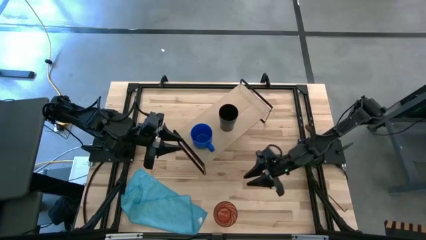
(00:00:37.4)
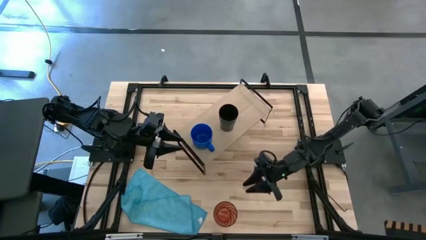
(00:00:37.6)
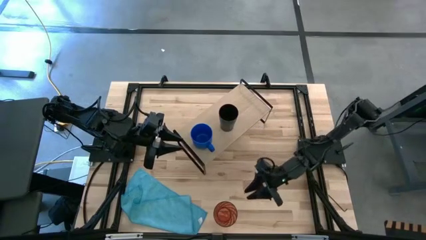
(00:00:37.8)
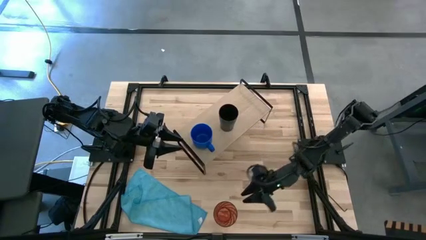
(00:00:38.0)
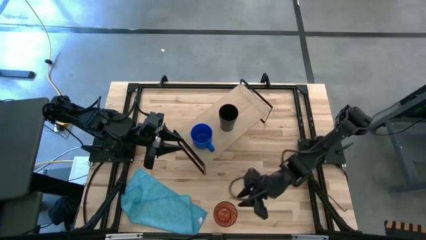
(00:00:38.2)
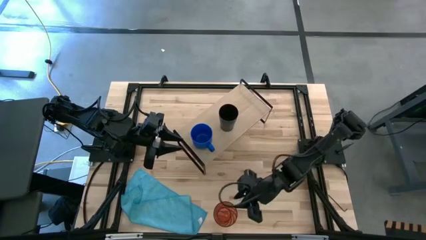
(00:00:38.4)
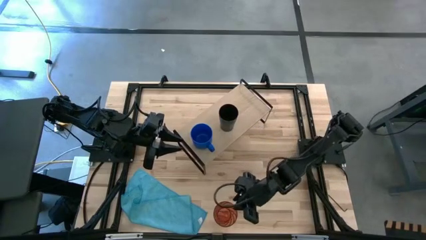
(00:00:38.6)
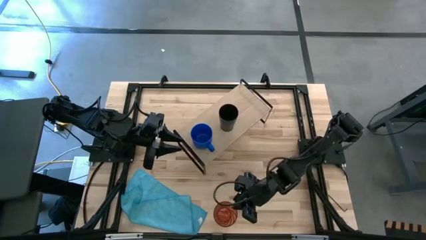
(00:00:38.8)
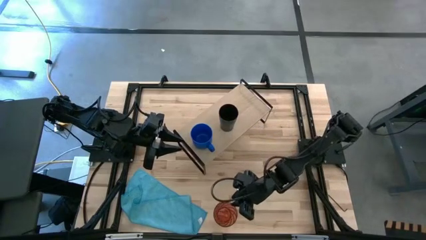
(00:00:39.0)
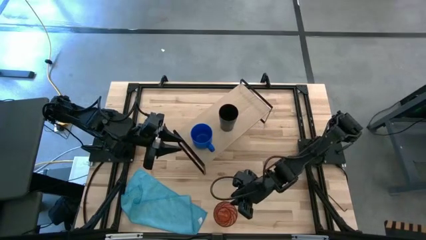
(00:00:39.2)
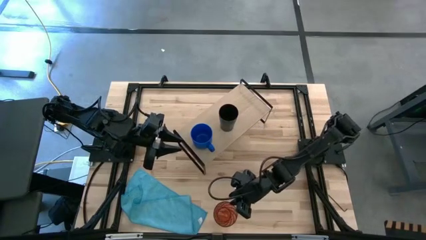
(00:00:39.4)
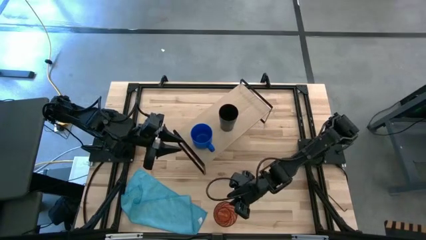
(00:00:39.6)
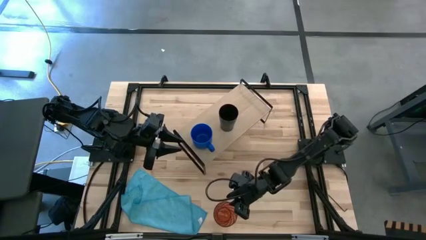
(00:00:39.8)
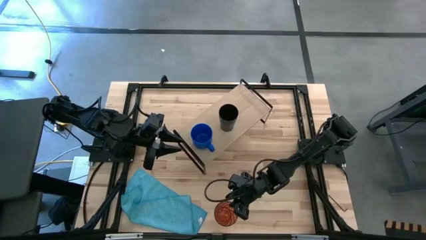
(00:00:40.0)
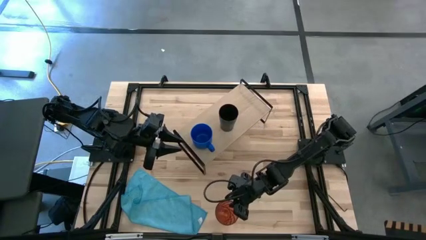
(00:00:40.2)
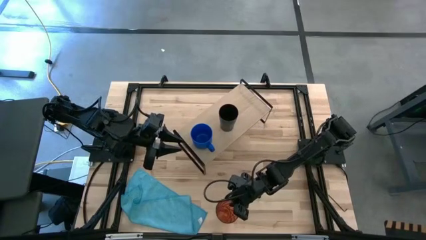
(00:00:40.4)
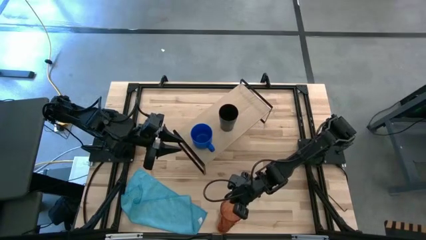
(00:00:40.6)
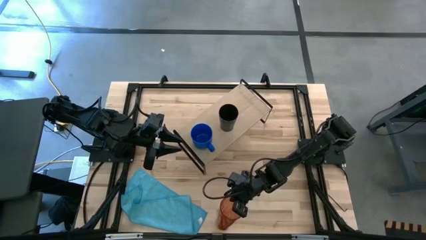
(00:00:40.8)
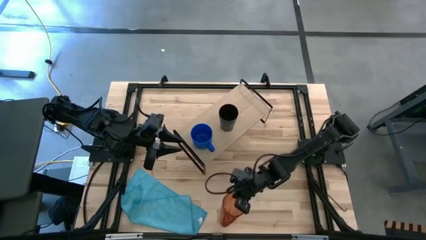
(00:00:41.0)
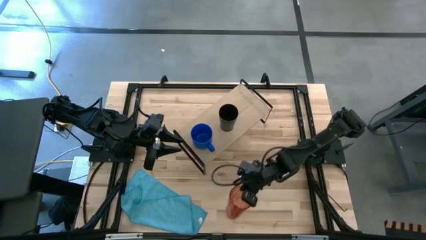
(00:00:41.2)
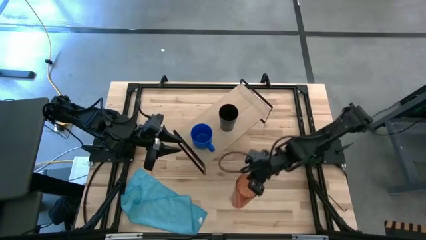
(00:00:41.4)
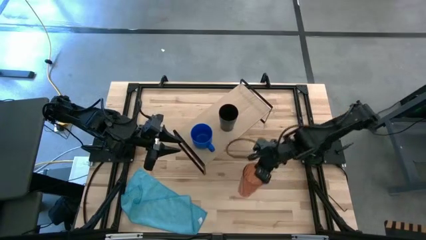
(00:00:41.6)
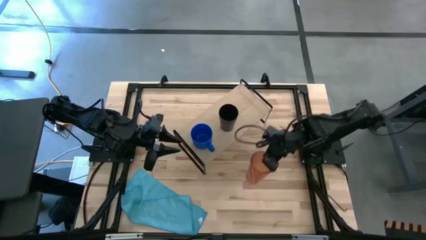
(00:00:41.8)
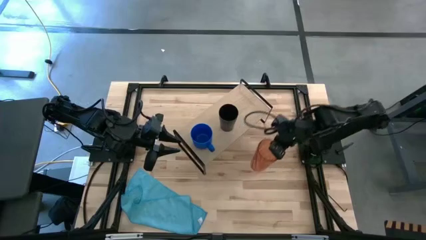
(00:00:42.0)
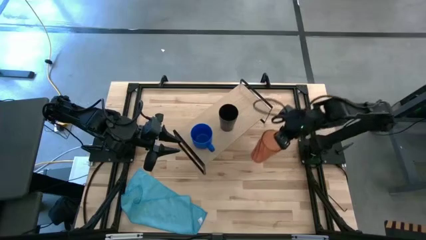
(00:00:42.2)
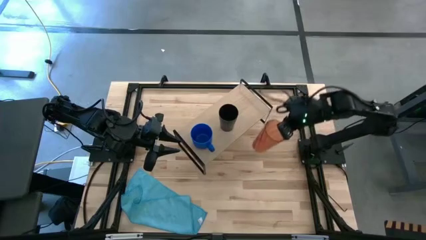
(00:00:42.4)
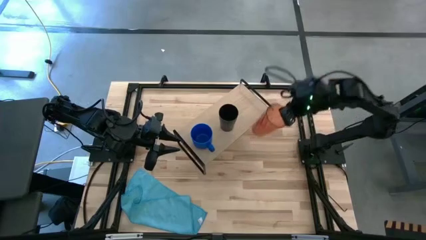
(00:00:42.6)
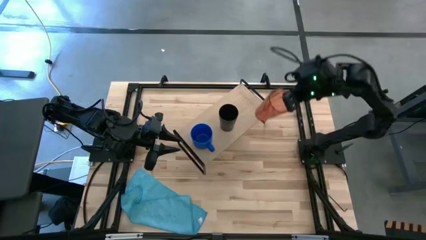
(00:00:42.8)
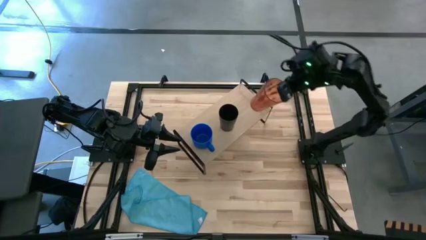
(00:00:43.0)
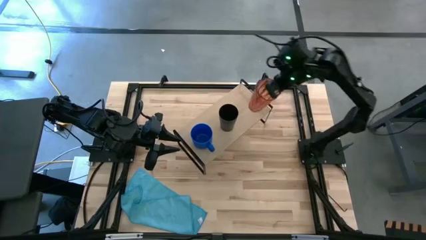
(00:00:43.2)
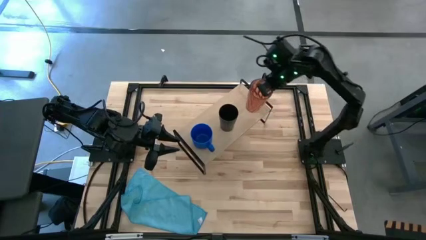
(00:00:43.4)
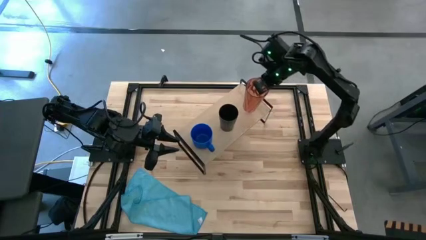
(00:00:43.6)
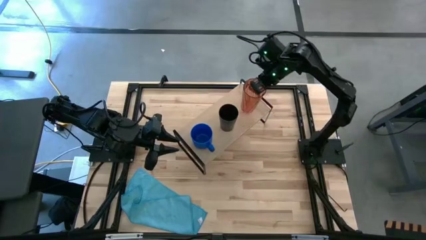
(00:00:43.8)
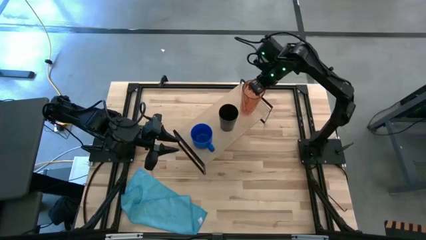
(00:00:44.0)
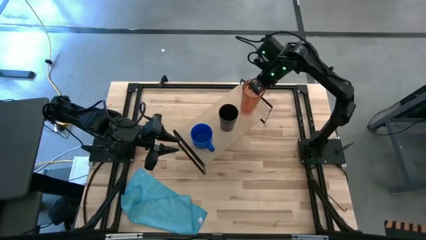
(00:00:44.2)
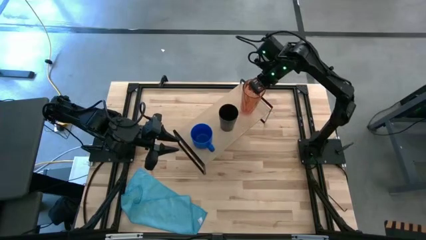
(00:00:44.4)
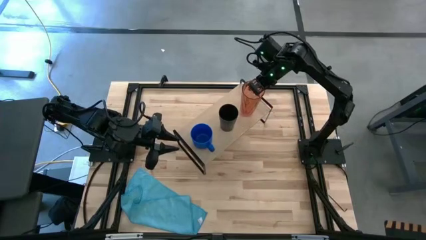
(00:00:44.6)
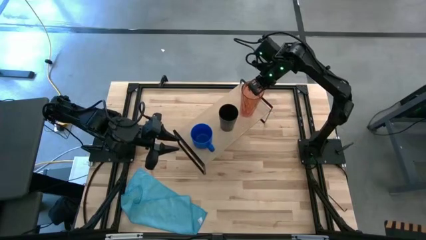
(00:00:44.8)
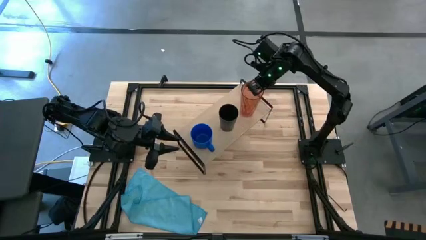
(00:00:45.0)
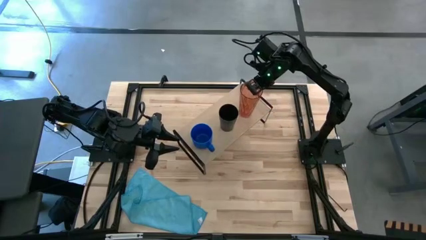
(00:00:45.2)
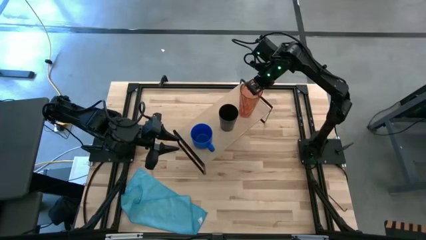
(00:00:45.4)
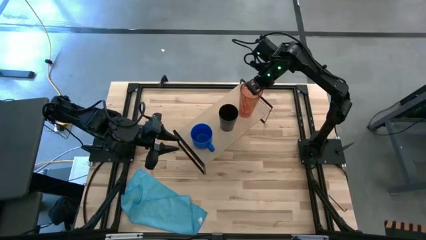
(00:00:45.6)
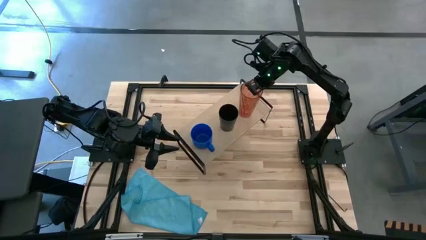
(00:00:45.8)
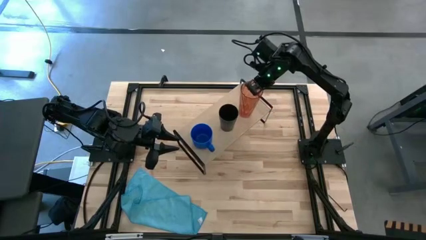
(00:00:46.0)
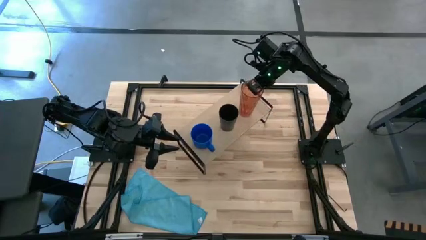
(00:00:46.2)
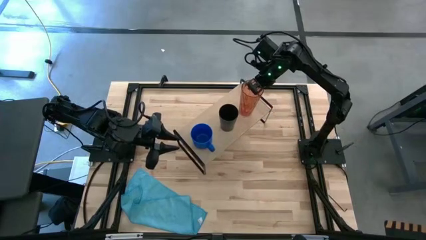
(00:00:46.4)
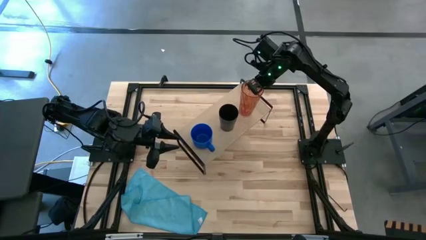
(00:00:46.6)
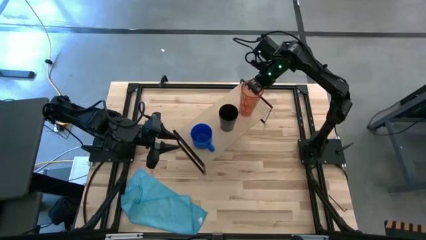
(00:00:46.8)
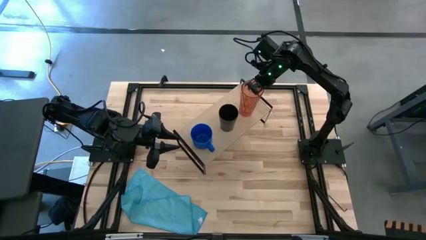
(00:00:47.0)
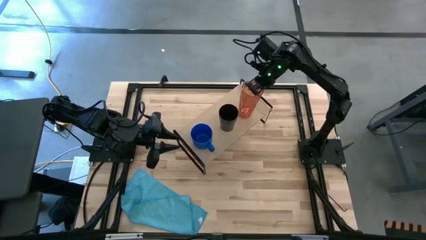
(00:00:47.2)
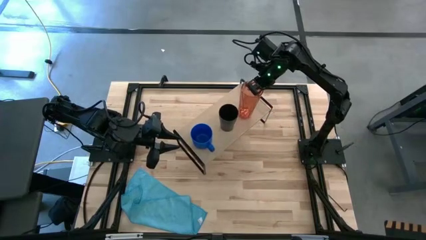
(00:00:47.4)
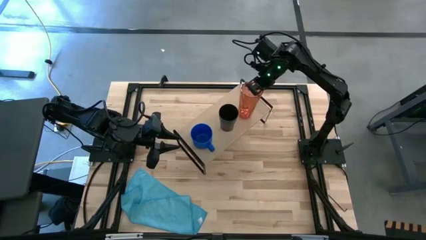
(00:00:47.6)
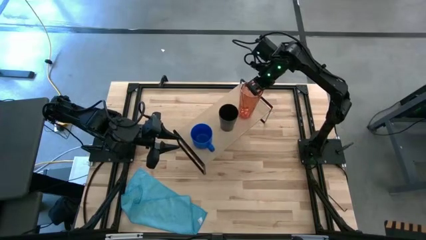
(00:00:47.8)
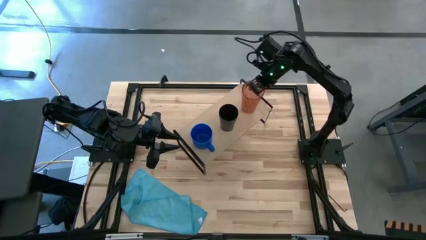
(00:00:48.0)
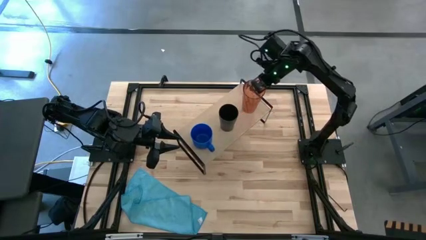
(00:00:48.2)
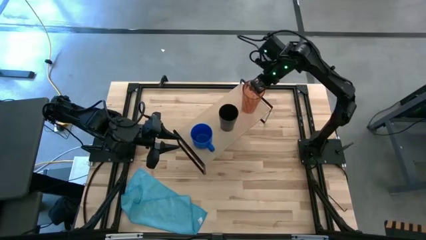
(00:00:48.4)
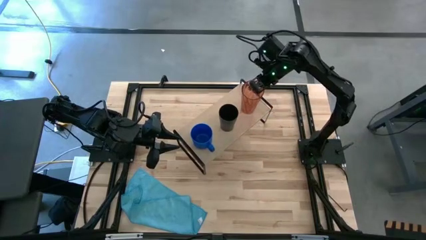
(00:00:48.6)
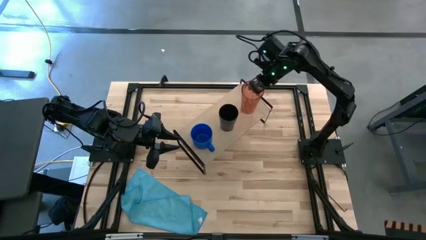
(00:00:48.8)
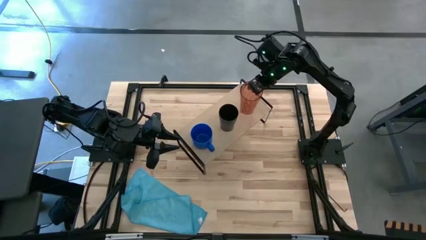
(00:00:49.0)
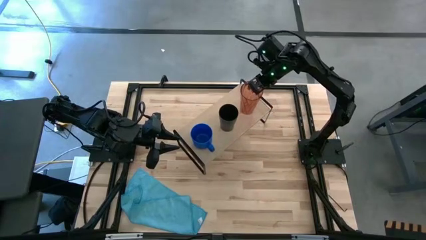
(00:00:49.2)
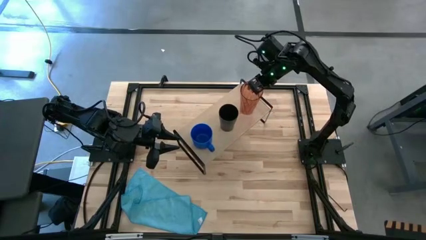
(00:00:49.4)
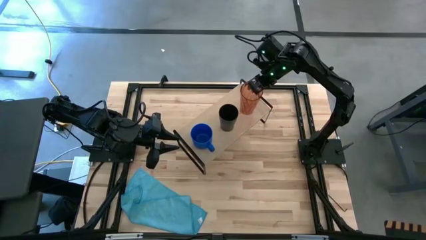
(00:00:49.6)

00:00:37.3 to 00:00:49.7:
Task: Stack small to large cups/mugs on shelf
Put the brown cup on the shelf
